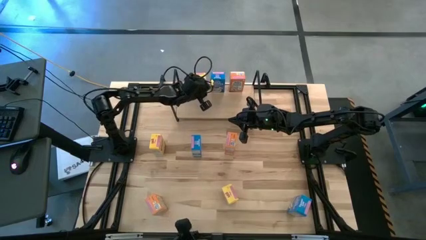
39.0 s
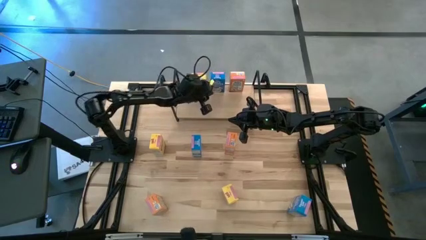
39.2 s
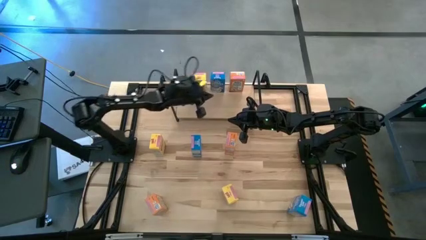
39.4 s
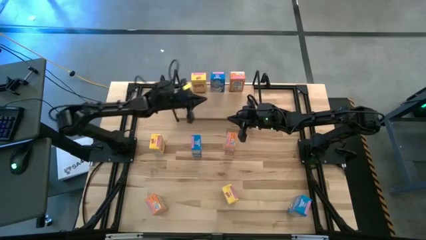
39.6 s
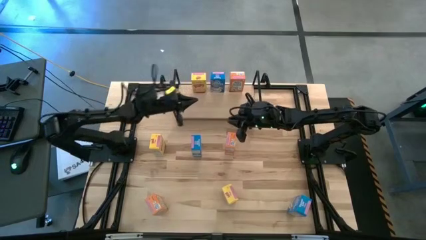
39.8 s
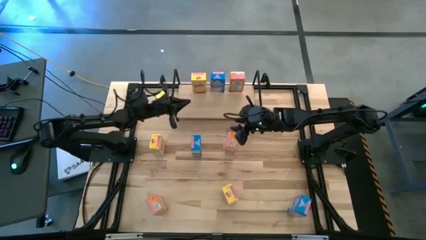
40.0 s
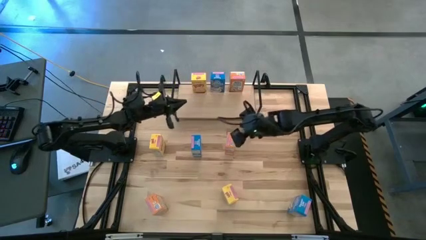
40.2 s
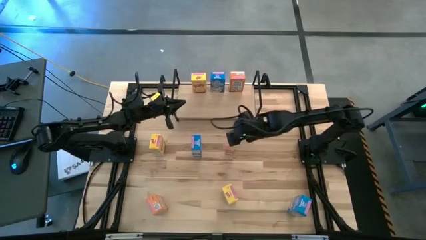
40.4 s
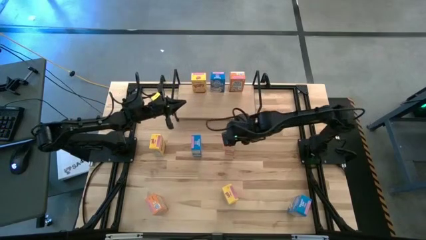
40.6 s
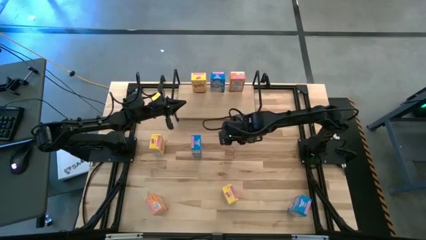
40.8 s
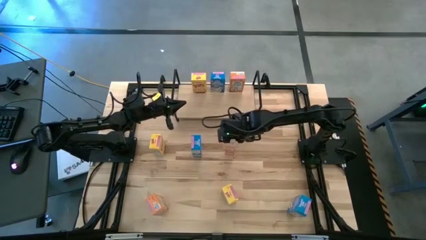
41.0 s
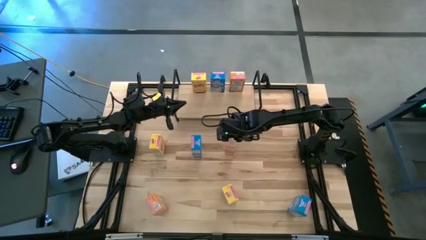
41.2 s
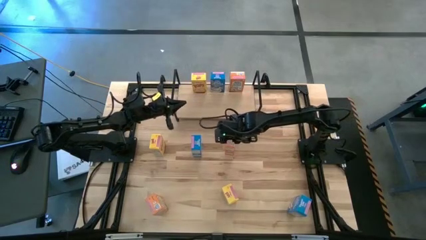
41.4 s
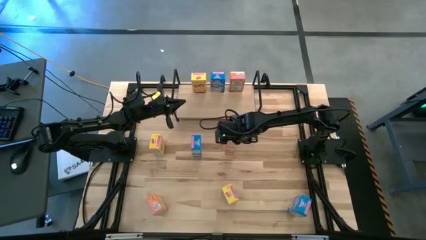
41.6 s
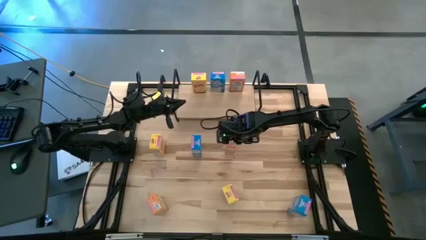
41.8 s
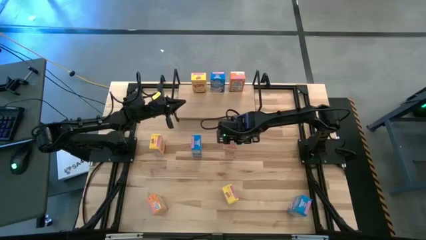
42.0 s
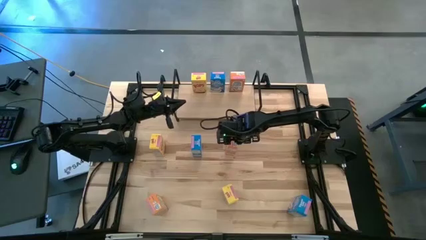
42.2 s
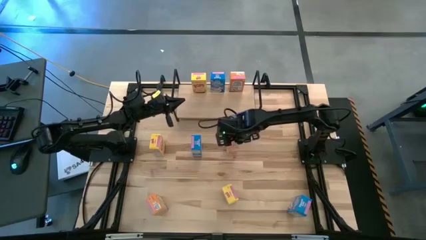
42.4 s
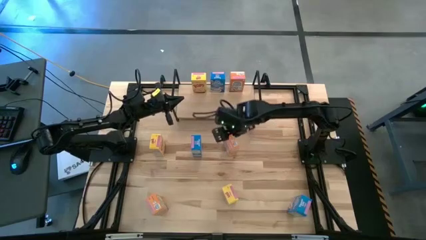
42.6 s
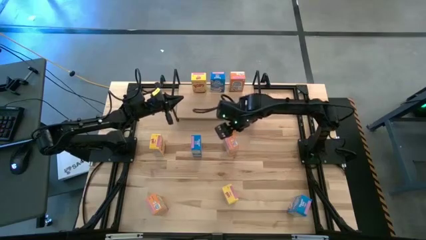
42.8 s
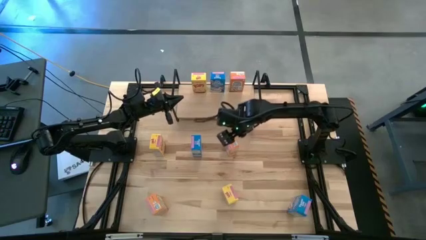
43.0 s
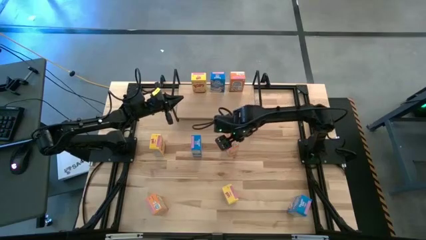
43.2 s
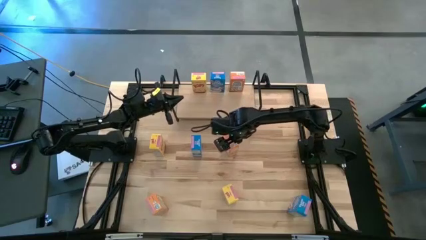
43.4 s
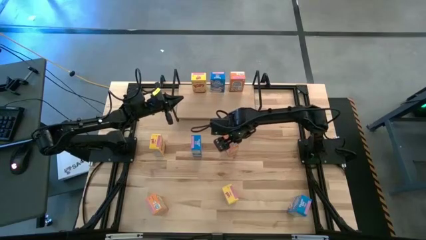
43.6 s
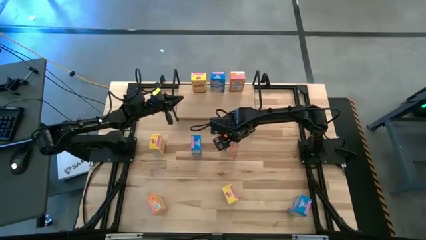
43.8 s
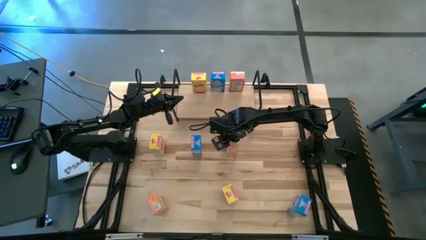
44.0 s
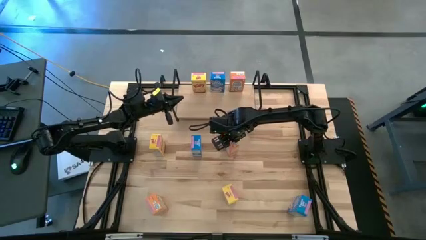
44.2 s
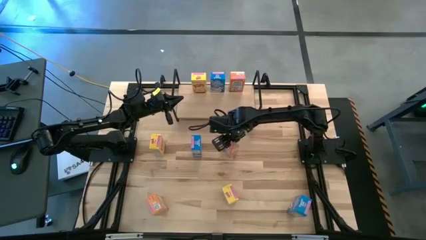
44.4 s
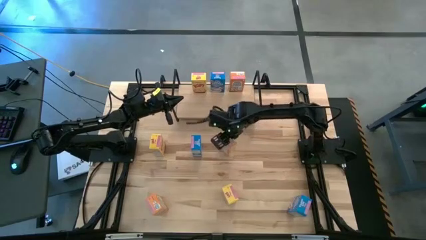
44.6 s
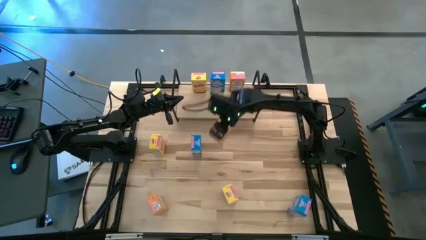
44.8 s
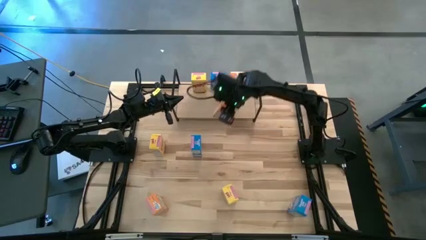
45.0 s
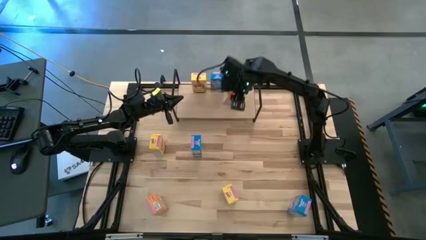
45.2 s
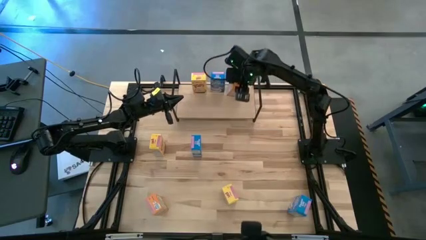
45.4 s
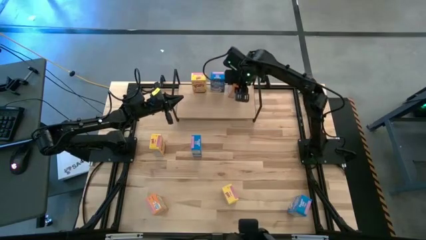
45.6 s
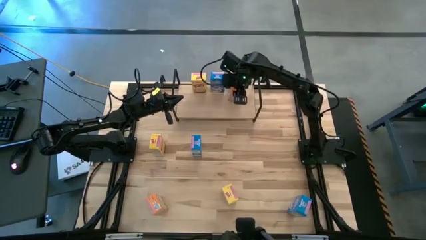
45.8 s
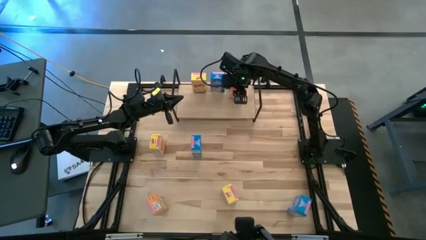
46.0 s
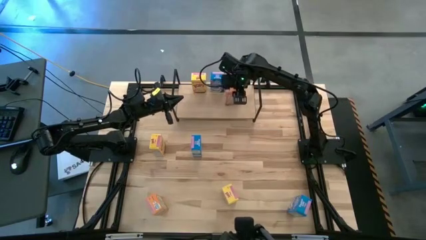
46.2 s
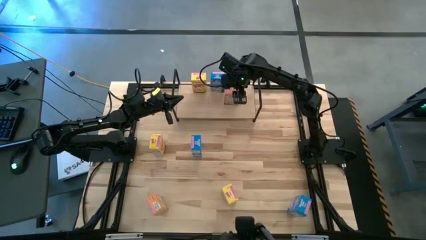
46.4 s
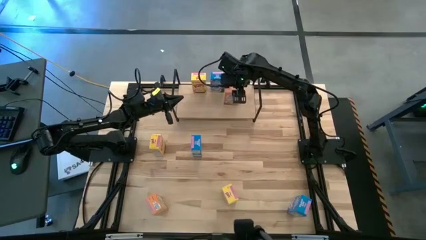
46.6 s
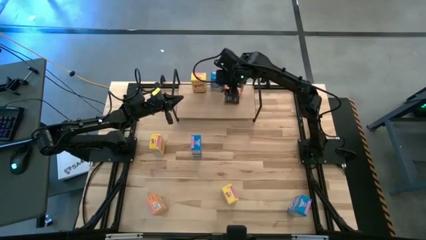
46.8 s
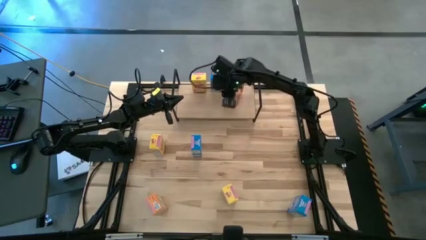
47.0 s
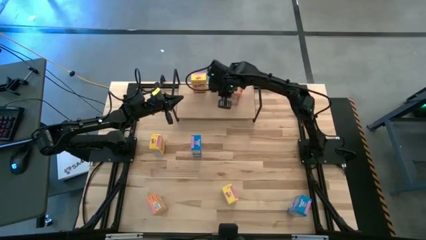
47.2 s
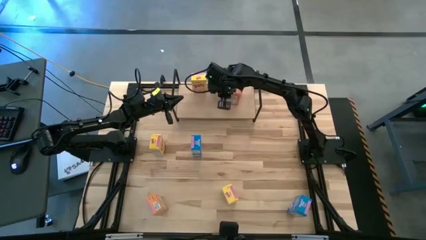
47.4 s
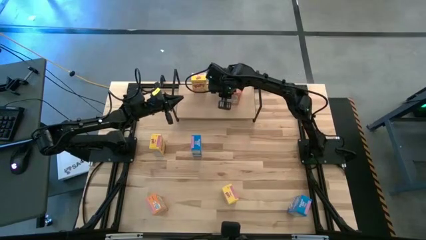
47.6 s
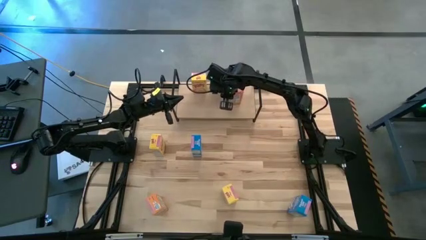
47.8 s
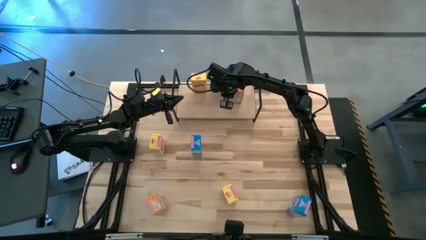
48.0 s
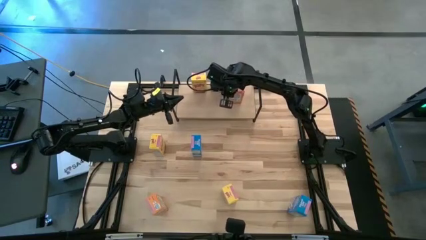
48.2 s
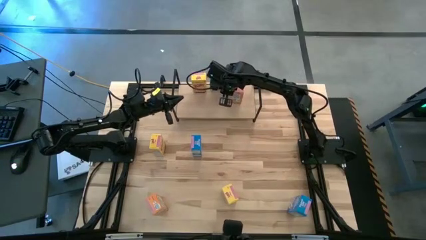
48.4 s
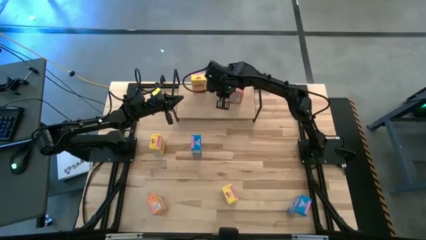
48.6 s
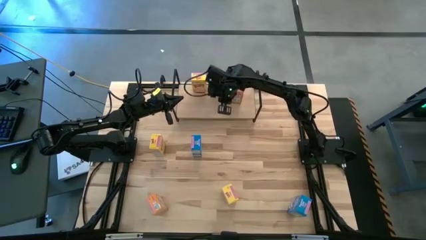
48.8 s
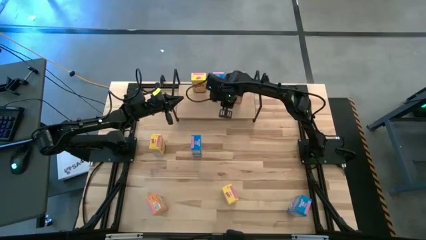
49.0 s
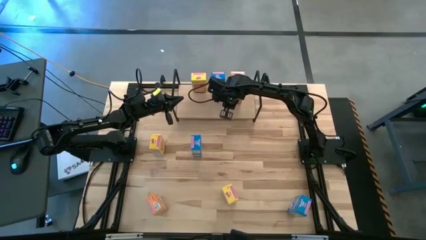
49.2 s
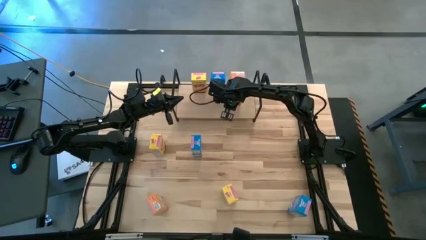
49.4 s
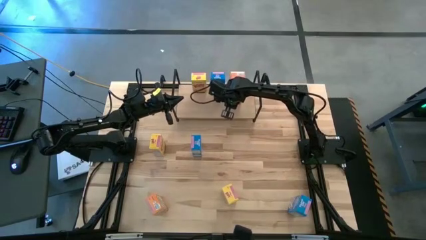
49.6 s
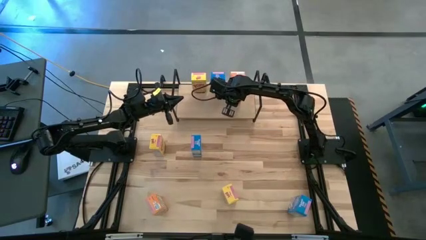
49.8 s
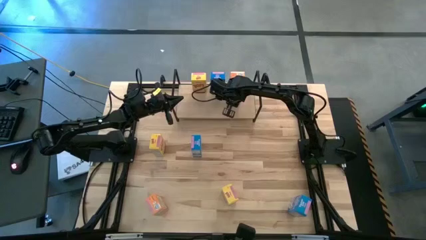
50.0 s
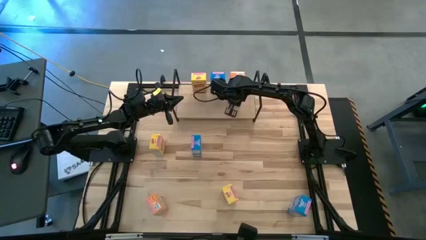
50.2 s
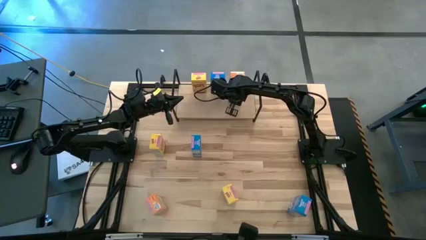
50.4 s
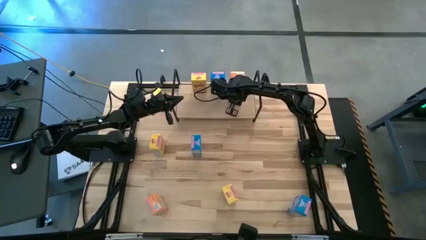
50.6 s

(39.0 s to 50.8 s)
Task: Stack cereal on shelf
Put the top orange cereal box on the shelf aligned with the other orange cereal box
